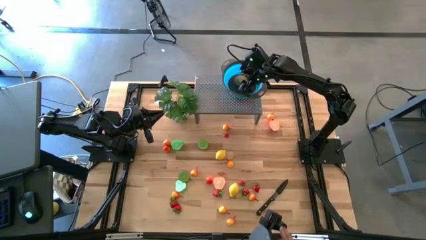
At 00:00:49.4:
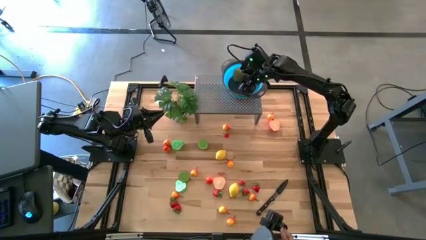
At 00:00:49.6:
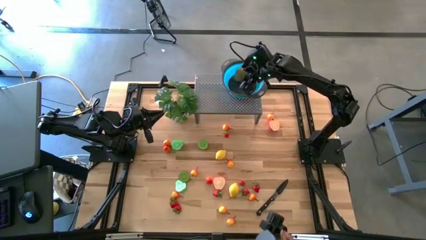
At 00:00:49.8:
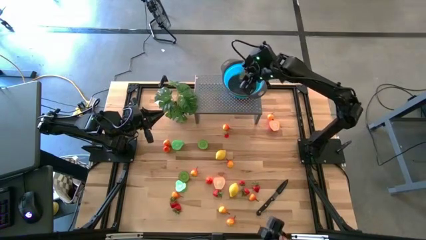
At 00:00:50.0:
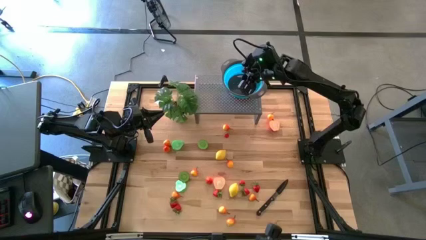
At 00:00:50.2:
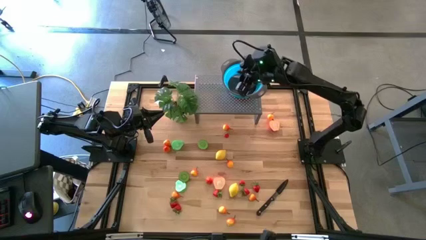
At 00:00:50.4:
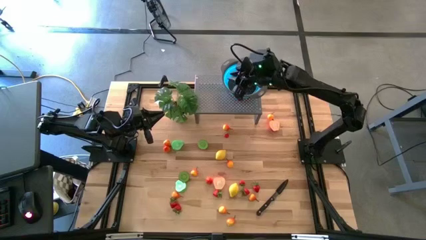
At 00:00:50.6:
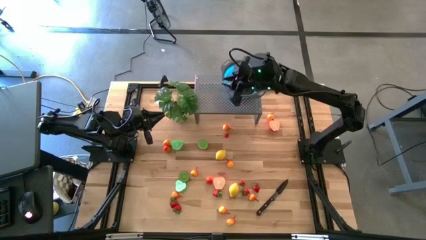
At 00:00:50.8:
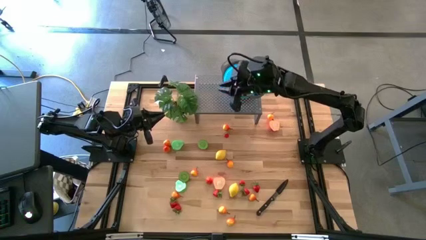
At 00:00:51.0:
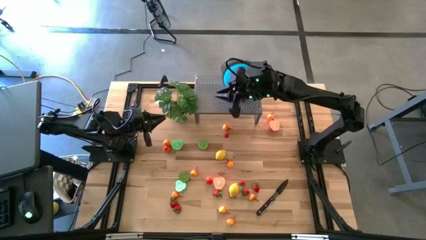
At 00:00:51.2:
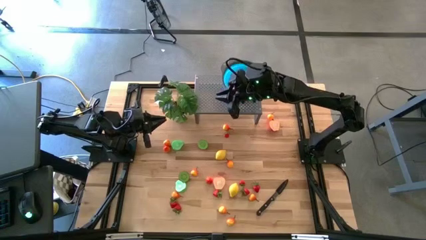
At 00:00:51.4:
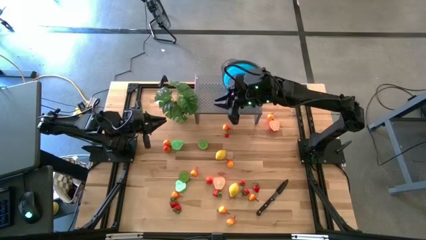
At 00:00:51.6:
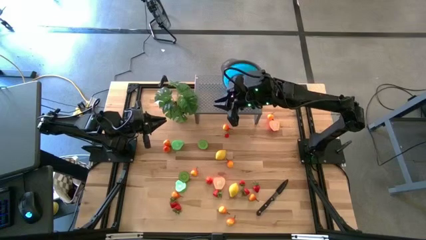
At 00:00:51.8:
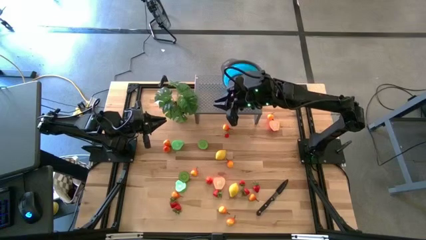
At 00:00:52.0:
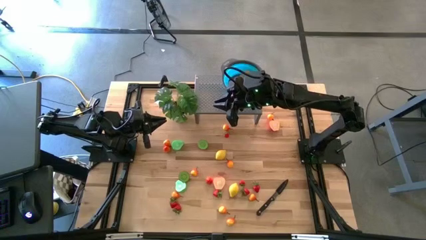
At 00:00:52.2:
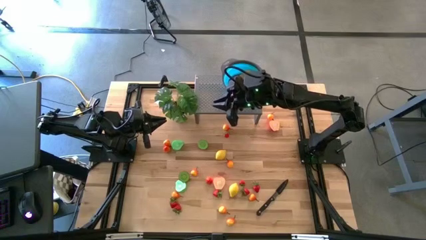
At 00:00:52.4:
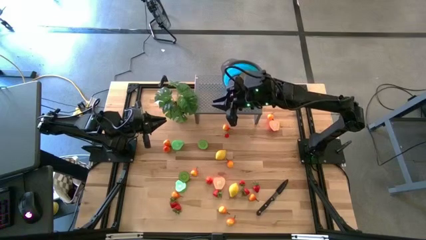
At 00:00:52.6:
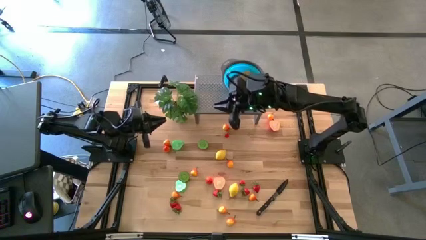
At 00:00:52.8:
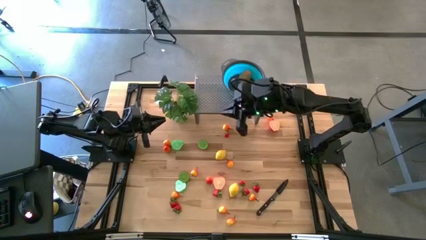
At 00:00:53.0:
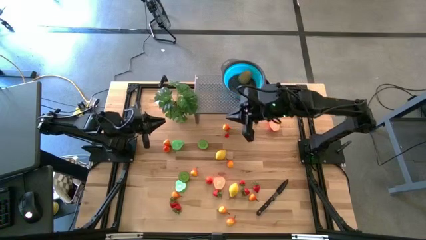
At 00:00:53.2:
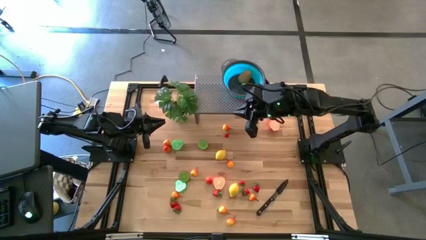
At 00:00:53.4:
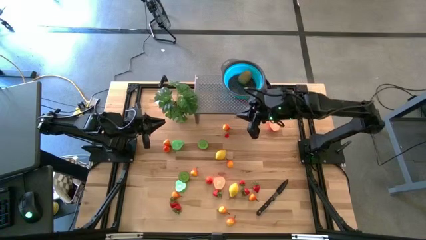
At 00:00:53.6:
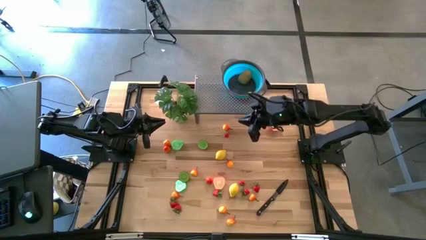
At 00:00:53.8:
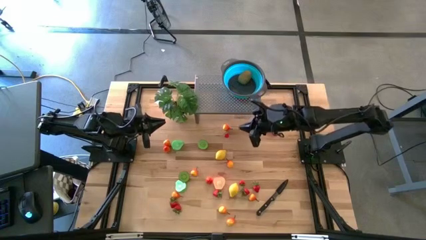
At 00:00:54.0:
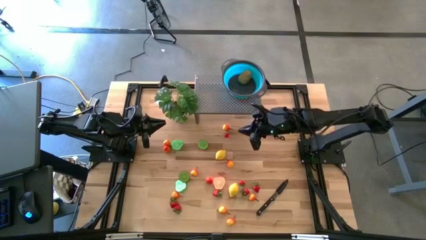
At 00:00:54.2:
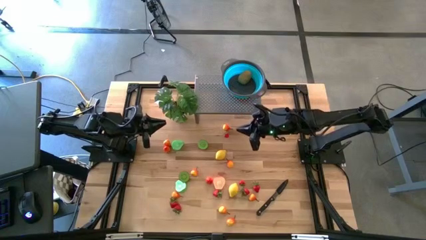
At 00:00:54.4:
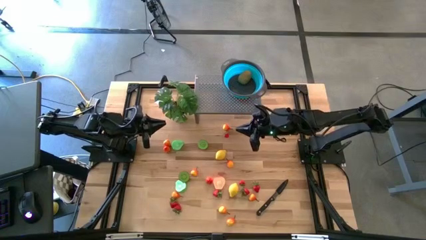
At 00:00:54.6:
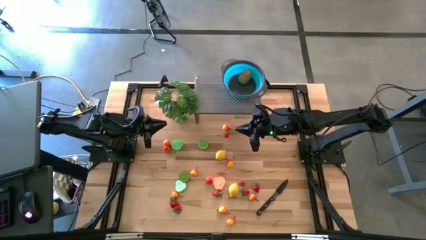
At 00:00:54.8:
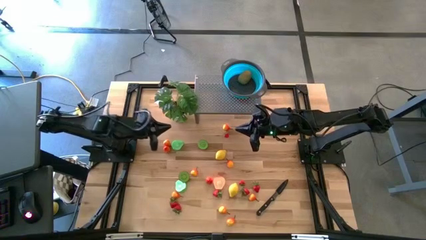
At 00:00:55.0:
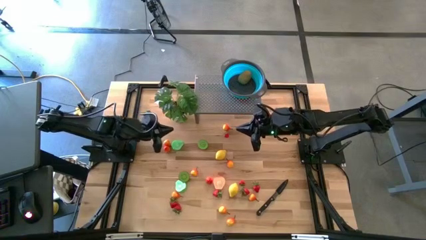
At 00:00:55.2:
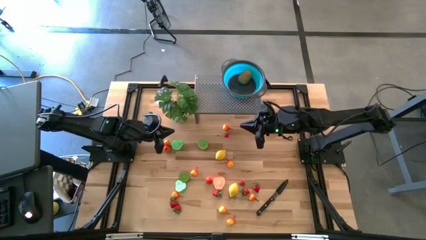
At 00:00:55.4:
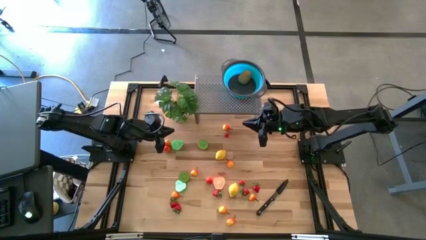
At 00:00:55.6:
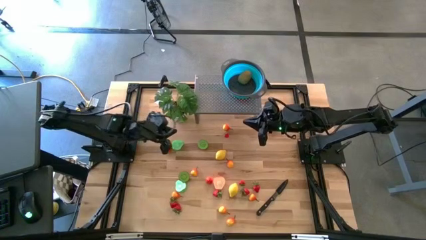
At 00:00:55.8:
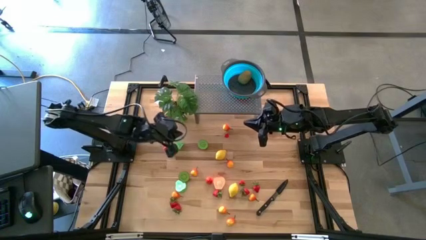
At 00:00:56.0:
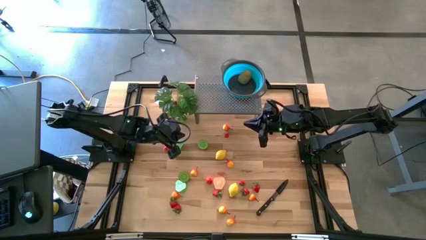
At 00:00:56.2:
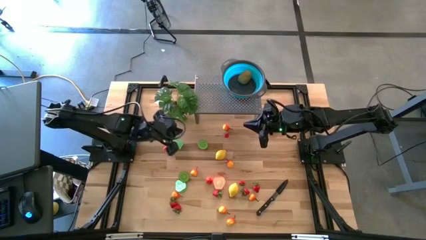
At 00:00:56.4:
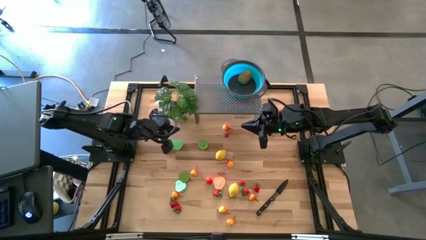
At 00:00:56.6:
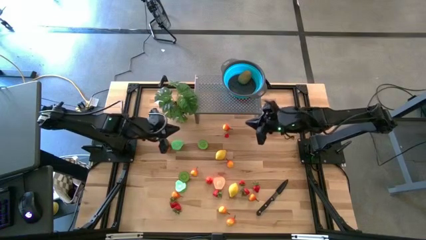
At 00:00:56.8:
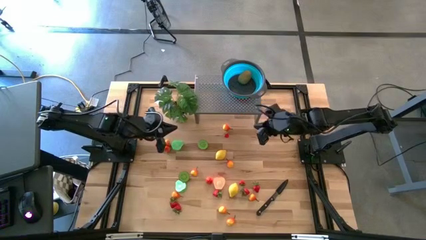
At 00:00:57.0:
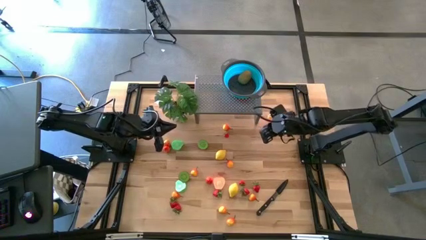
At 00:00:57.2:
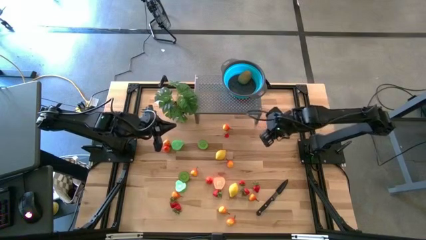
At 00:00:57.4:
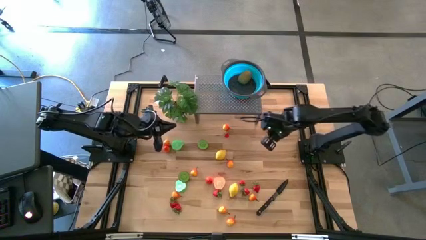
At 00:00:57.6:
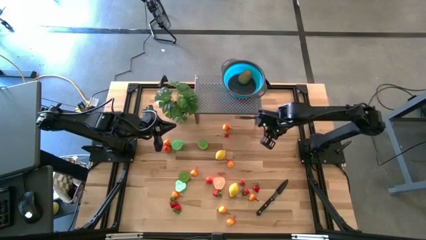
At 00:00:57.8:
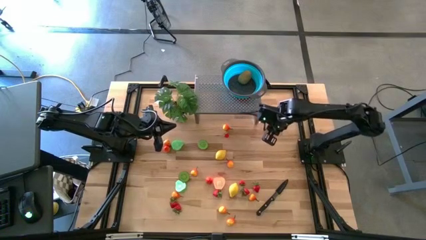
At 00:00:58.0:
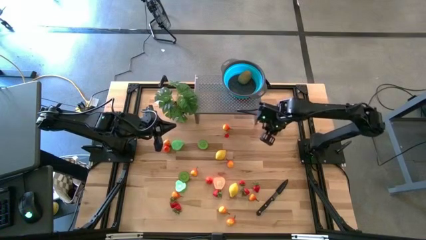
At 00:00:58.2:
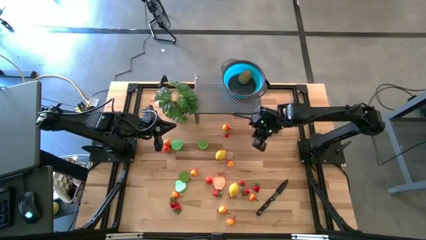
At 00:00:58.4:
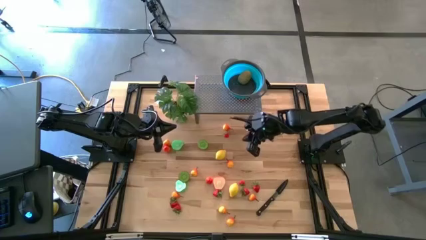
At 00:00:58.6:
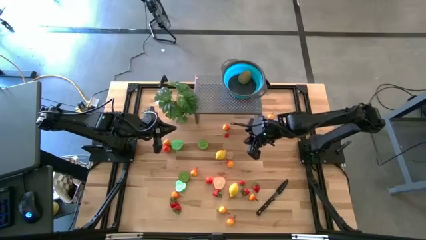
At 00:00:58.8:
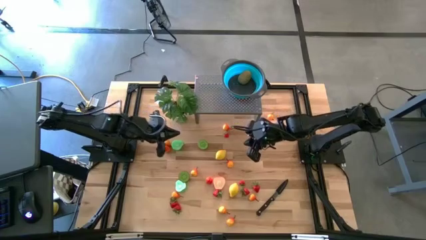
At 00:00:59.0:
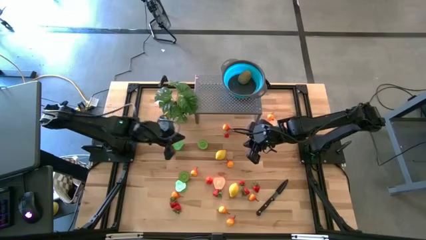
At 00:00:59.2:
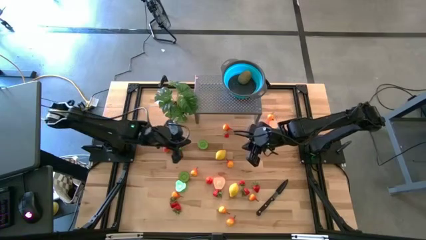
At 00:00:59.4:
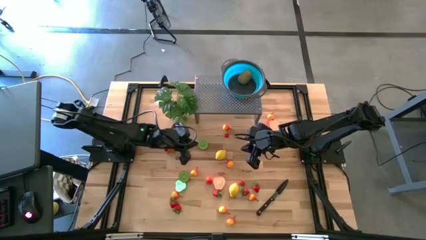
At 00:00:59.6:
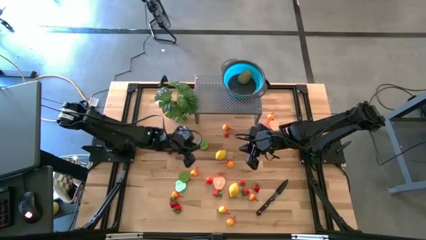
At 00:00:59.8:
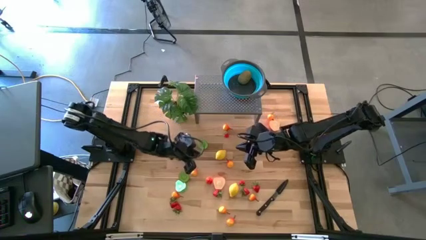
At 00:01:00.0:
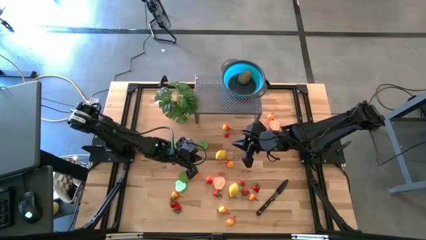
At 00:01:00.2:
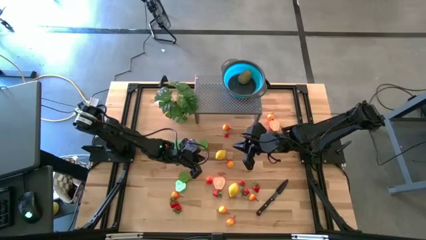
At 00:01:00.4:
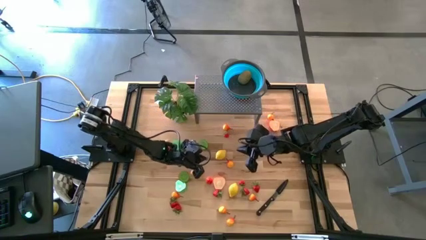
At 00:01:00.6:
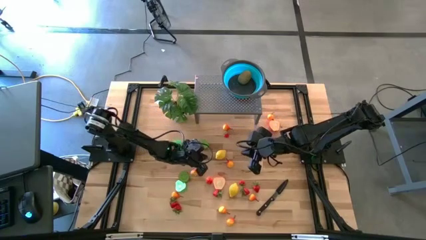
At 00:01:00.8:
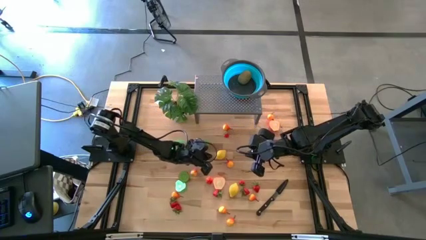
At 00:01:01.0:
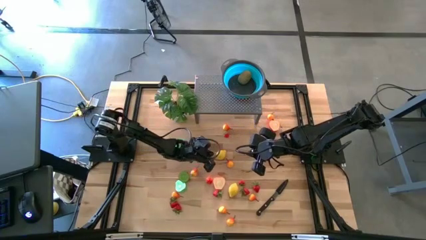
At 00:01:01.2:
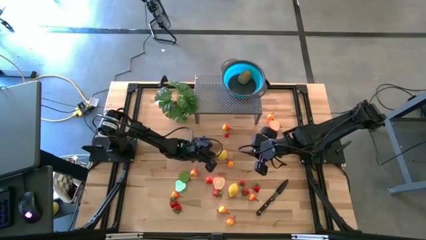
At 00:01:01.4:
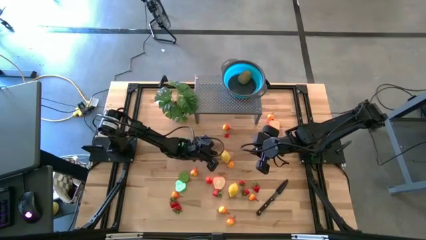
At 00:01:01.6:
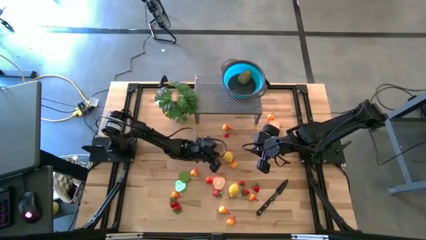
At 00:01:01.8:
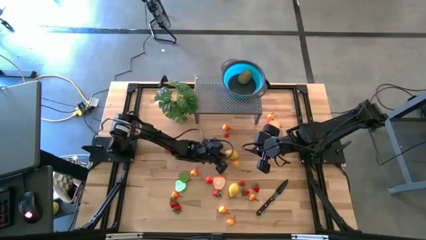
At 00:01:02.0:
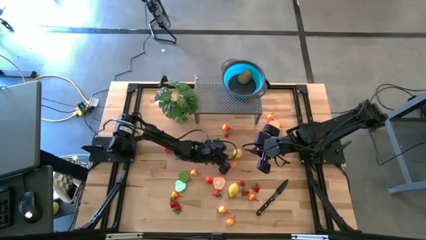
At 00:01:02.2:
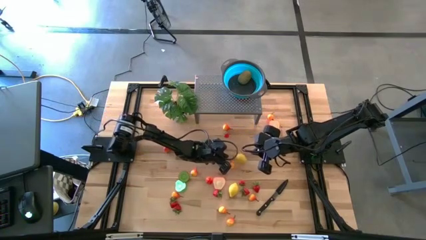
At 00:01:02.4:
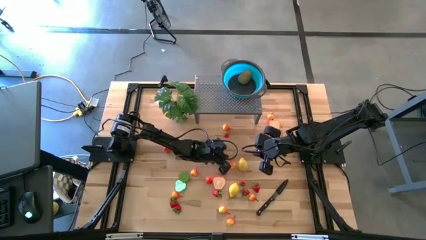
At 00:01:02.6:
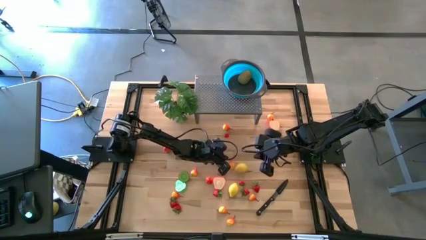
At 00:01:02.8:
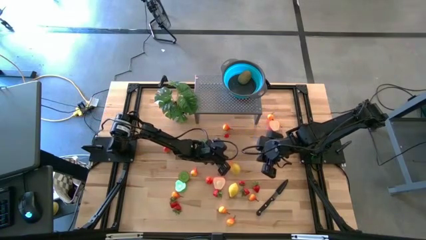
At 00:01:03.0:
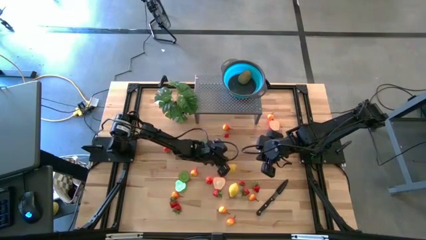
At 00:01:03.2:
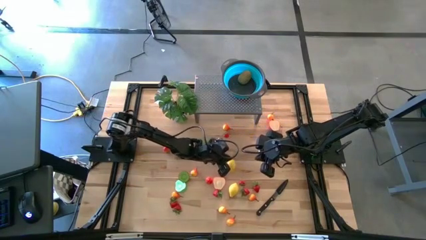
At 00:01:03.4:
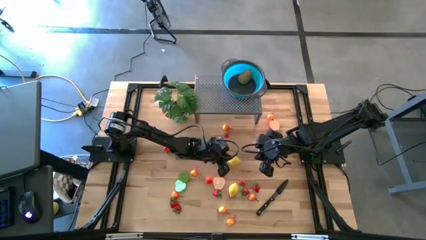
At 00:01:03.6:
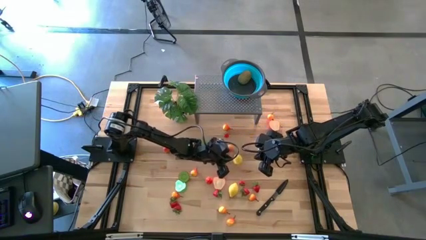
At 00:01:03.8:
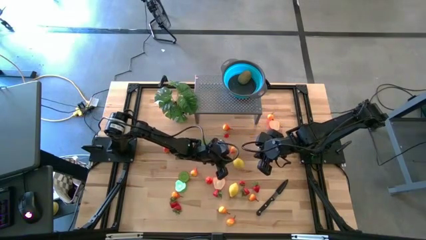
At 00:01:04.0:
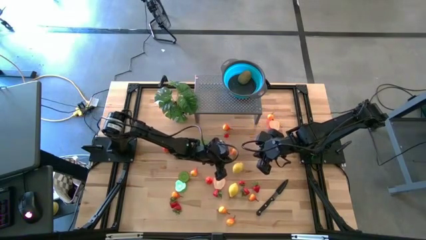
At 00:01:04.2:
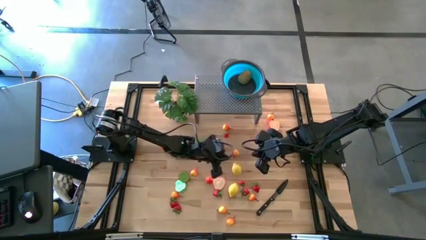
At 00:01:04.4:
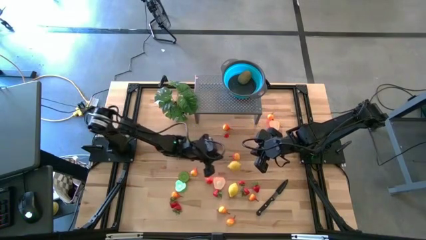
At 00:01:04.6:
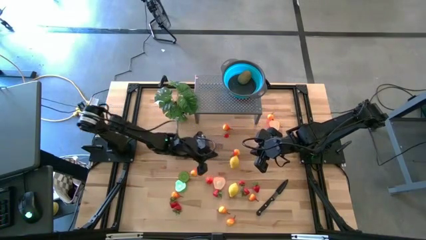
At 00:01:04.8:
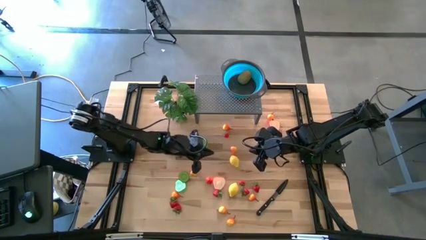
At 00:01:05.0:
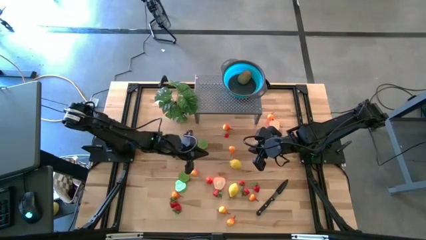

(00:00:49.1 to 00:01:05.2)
Task: Pick & Place Fruit
Put the yellow lemon in the blue bowl on the shelf
